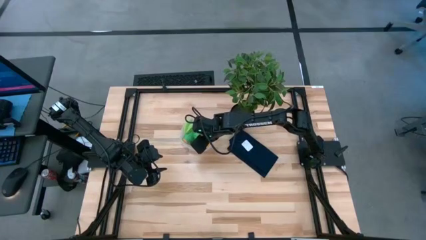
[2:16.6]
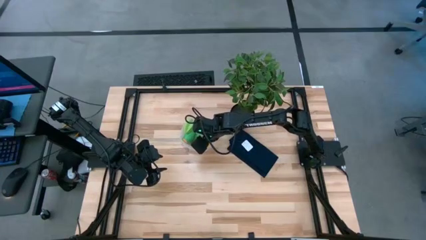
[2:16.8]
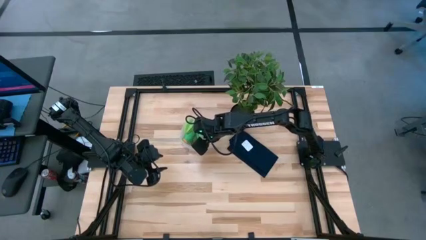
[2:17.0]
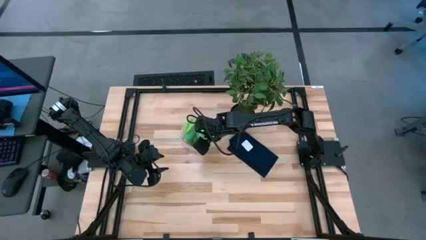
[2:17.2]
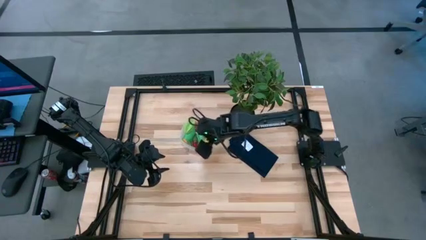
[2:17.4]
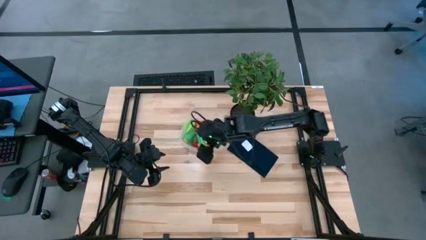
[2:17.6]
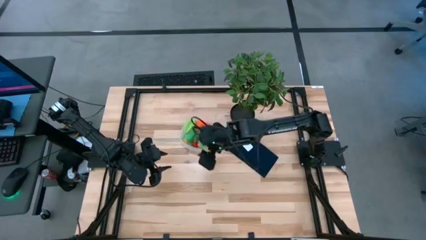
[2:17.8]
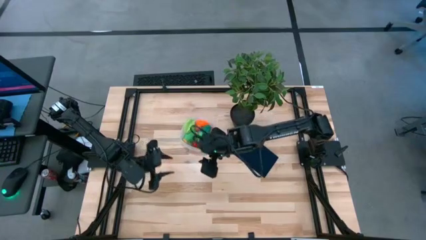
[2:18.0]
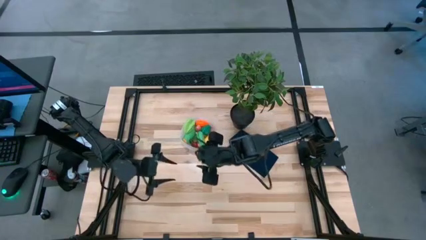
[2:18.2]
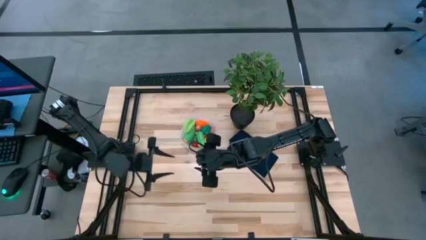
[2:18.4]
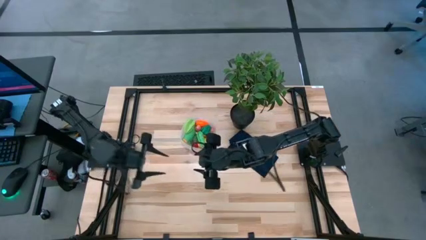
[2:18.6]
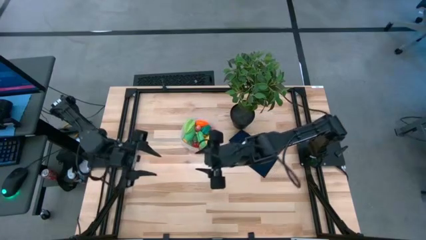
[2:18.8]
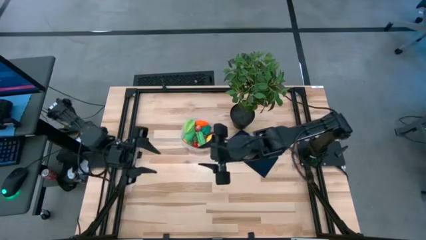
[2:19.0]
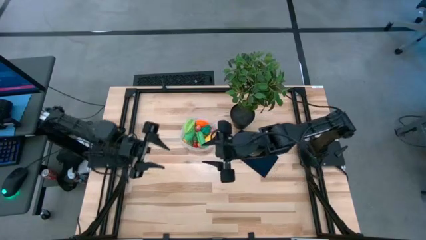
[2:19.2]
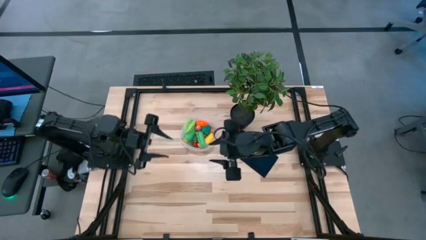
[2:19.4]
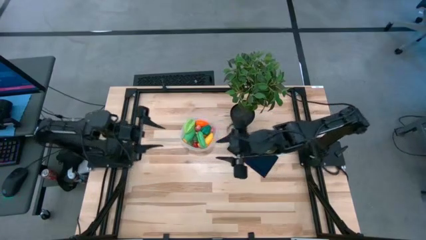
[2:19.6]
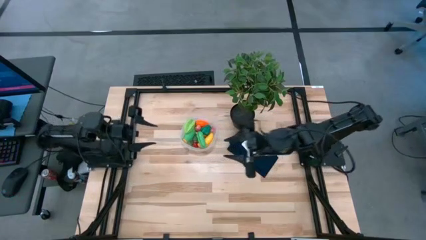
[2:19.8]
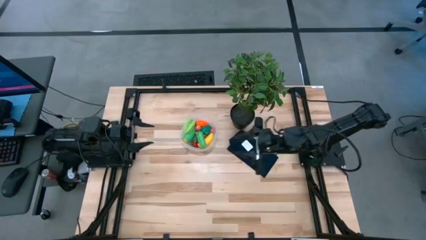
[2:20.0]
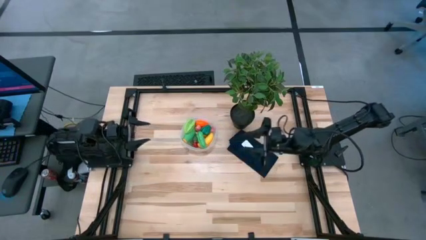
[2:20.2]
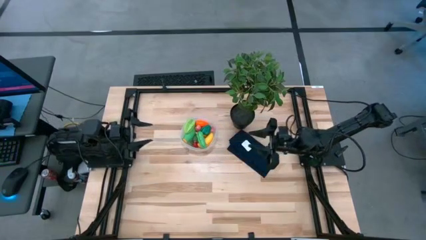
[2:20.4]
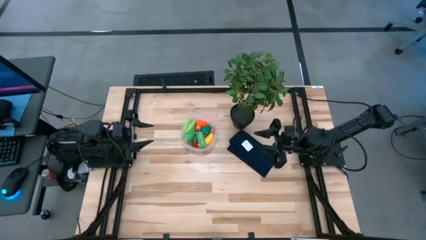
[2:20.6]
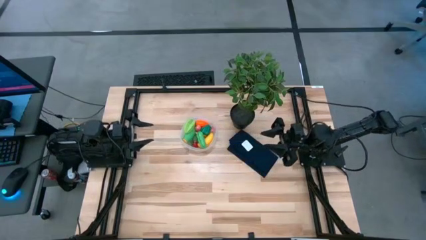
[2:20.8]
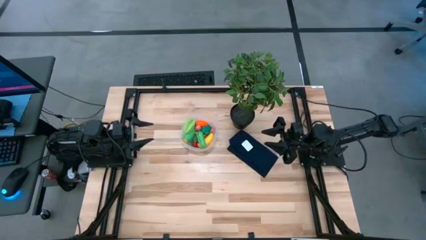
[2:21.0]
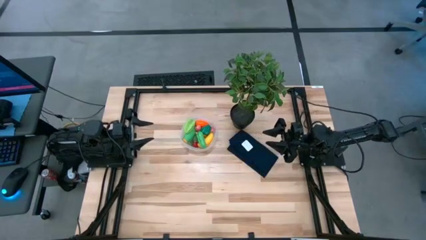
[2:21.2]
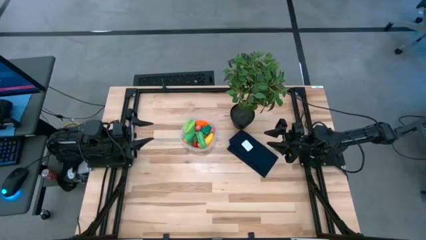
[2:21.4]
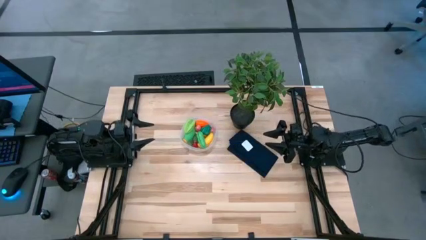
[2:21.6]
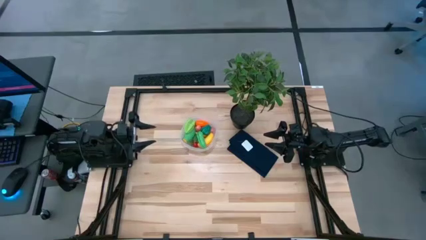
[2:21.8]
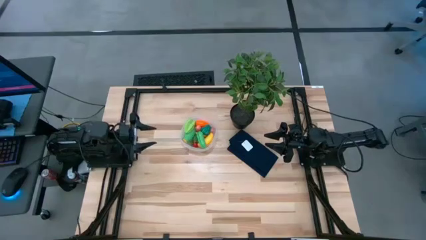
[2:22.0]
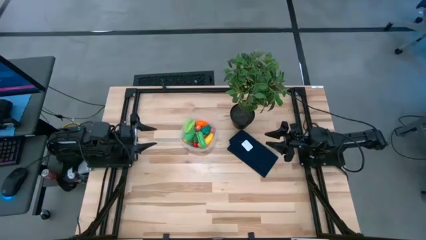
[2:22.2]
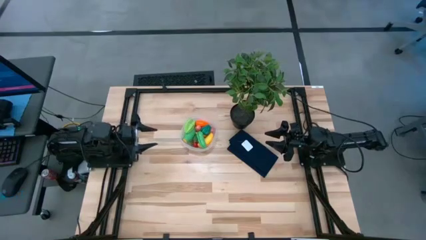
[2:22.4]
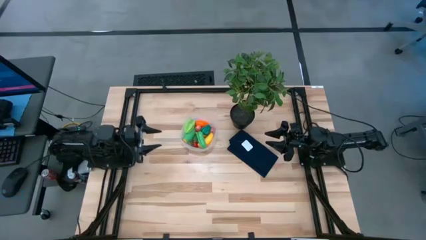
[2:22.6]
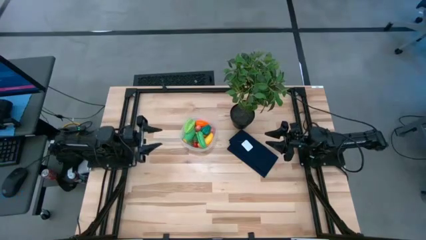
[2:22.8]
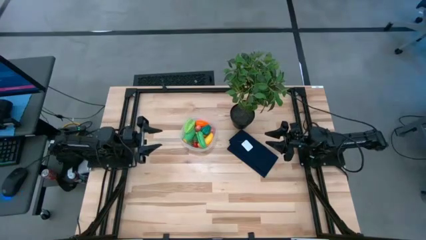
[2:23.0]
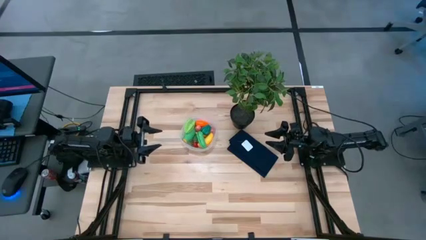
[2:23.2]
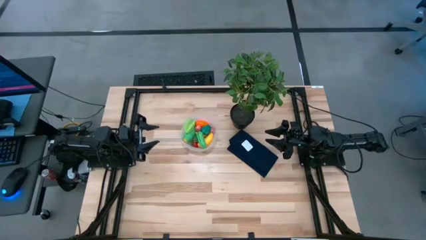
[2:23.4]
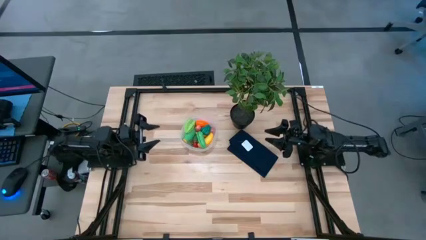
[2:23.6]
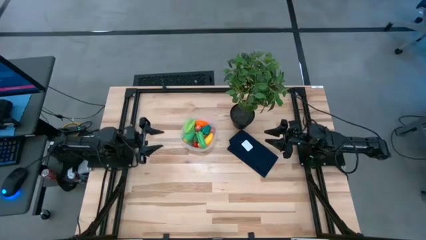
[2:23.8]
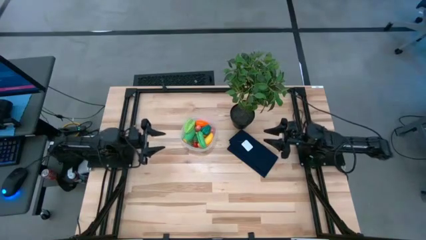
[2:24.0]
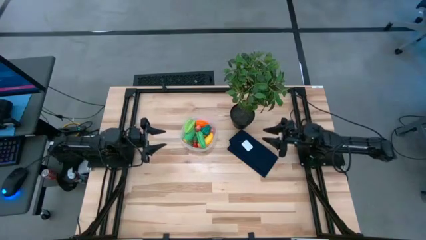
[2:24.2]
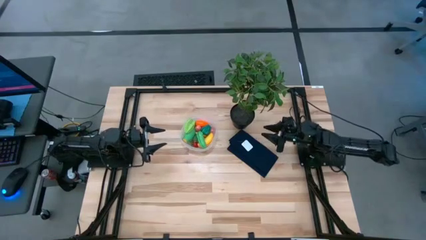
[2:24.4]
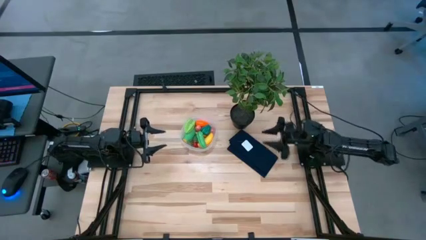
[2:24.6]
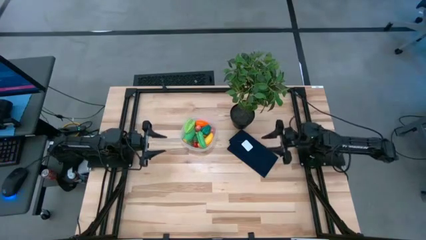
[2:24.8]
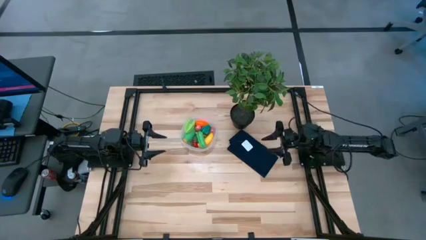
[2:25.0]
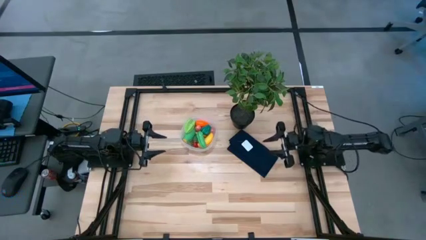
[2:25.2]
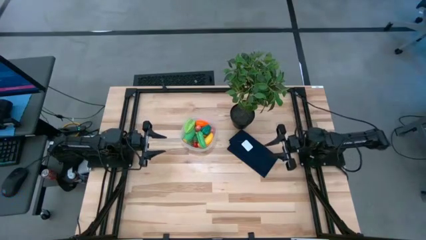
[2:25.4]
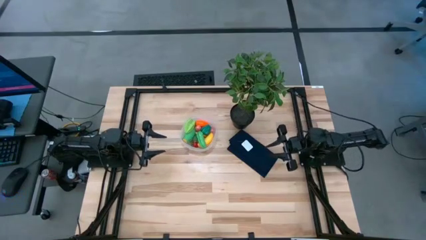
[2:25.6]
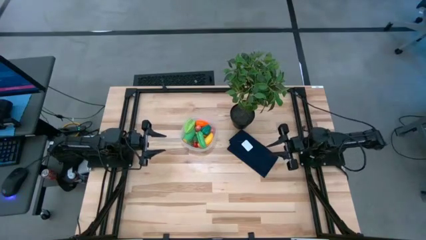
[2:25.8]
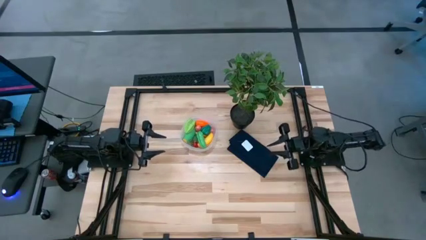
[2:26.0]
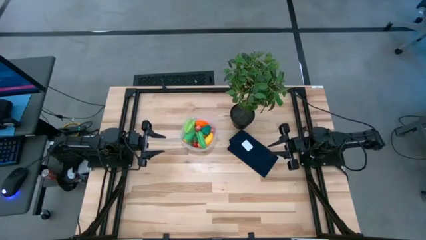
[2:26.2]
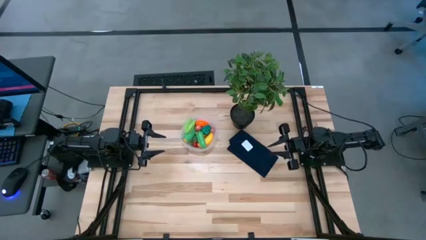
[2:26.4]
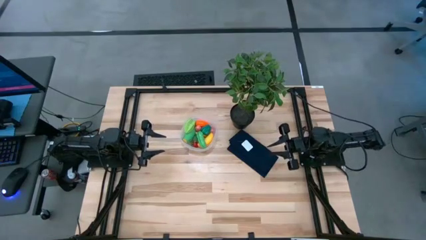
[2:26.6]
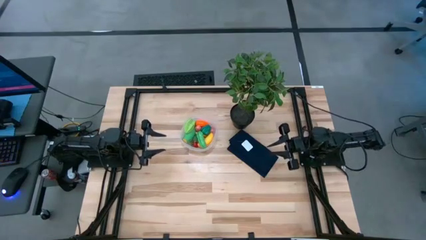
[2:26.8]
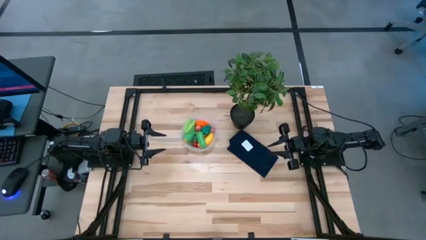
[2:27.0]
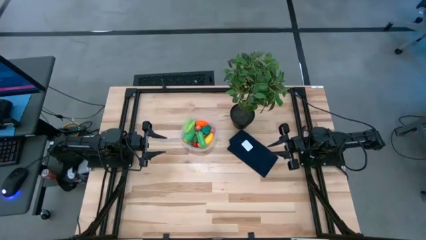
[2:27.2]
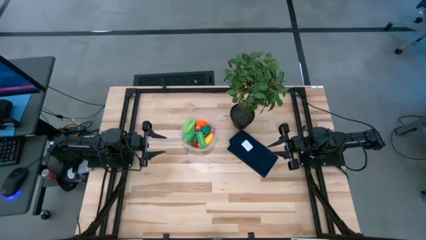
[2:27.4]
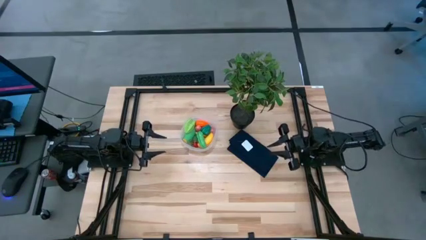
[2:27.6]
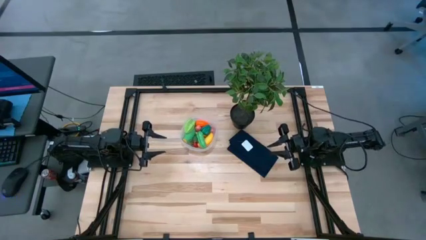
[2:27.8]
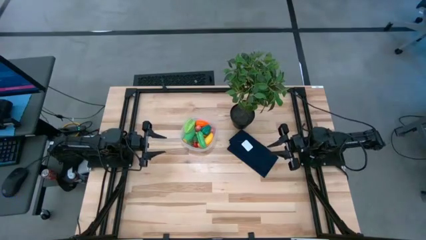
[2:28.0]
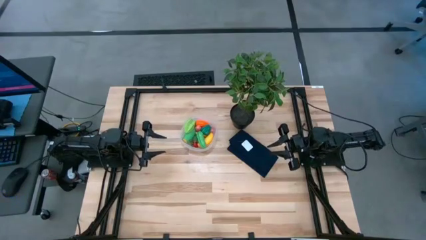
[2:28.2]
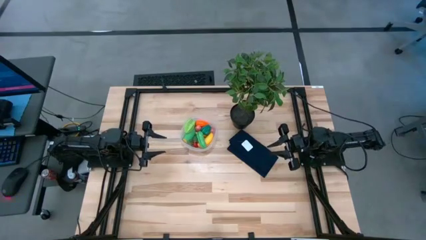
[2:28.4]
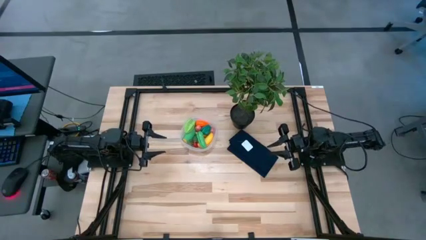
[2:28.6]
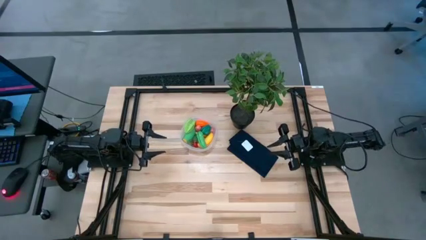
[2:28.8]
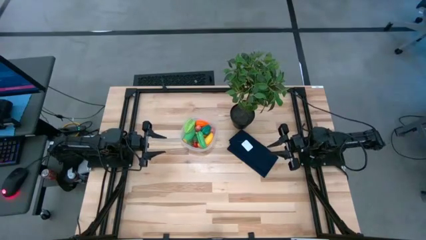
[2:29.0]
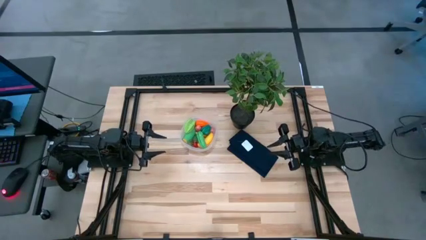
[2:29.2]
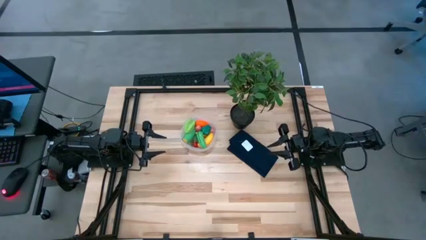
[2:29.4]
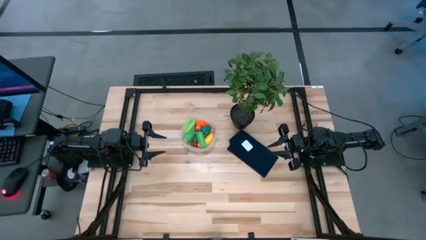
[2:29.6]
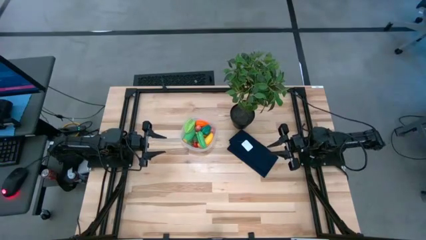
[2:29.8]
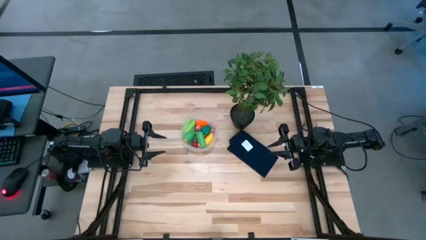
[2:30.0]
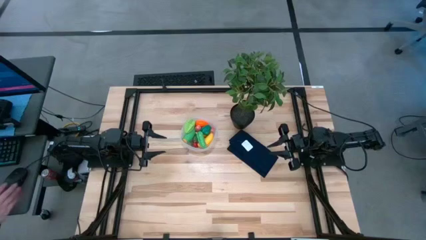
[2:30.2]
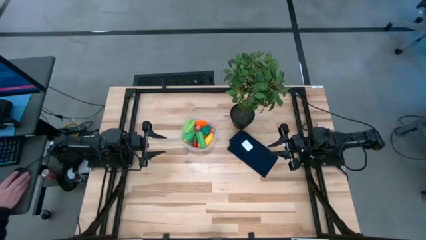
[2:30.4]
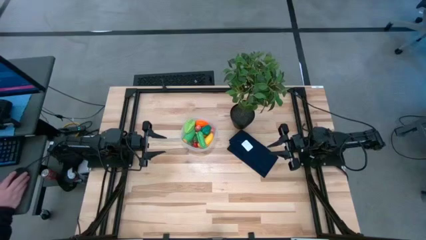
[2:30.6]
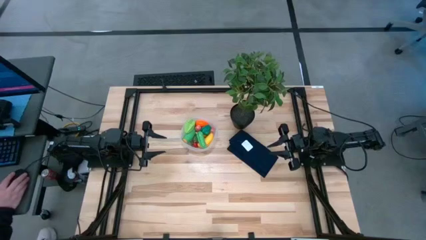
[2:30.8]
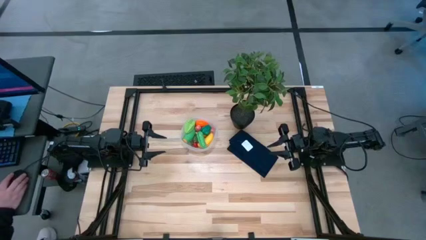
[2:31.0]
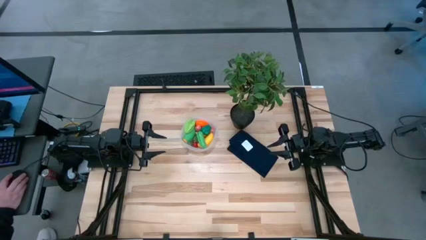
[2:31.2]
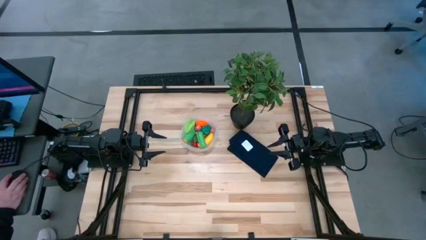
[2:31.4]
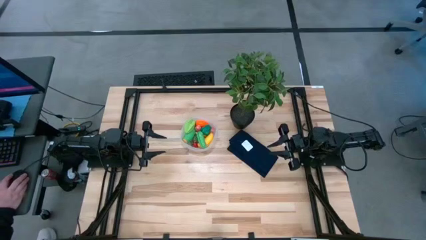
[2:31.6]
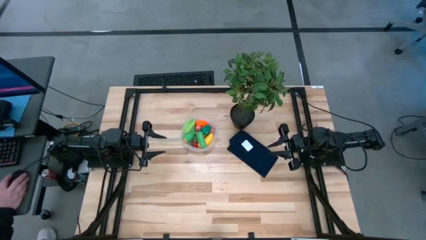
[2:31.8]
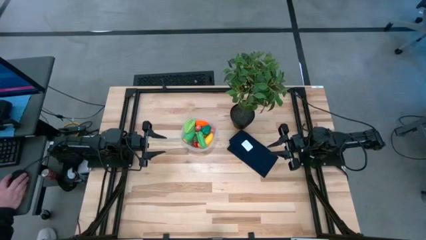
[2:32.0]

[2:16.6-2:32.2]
Task: Pick and placing Produce into tupperware
Return to Home Position

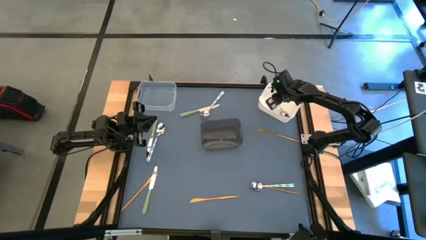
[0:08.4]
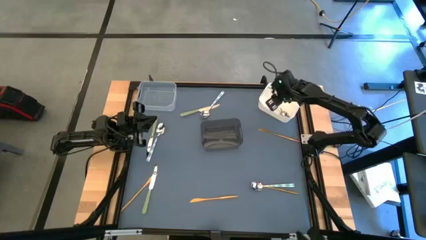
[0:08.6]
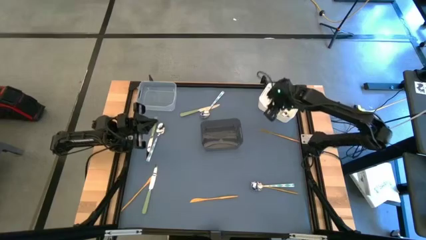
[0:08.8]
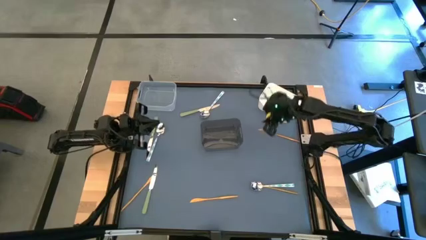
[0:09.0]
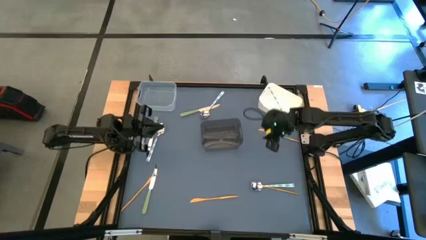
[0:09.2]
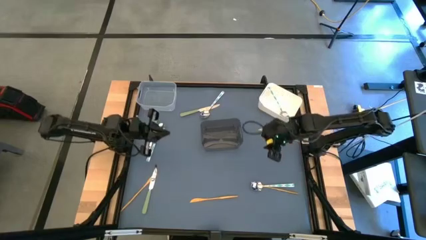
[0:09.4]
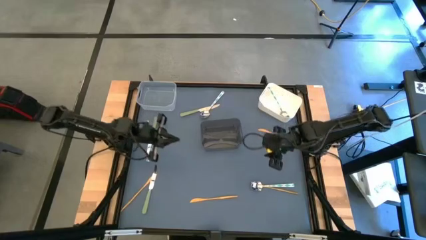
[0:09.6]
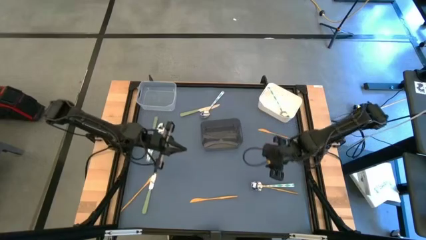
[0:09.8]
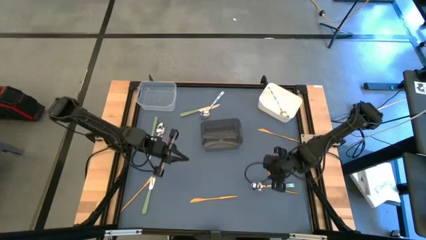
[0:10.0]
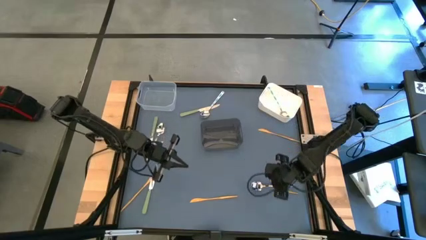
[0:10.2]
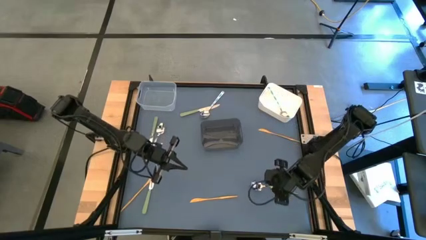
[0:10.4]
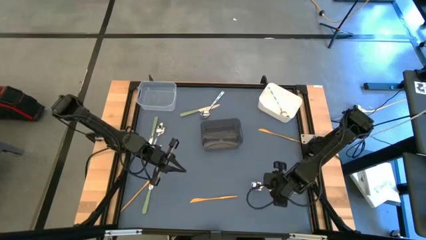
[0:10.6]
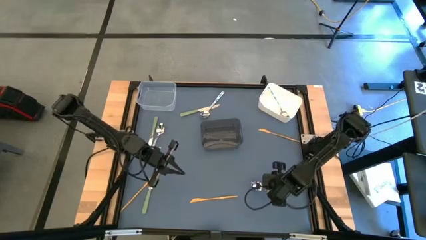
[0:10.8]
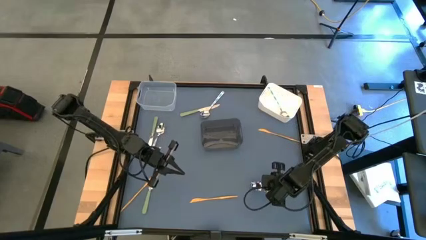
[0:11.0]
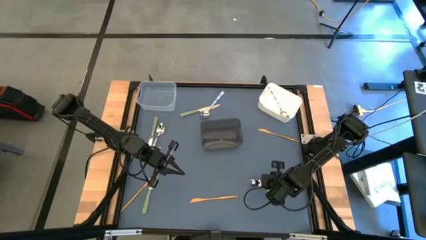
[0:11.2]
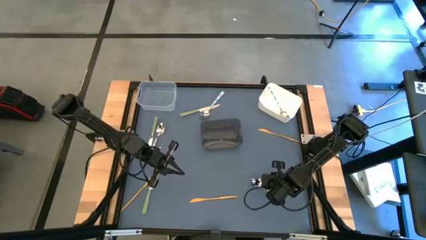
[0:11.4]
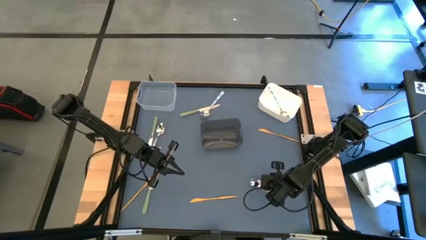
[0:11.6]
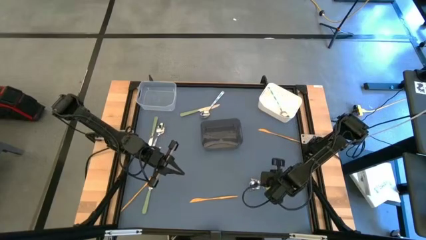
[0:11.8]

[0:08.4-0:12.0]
Task: Sort silverware by color (type)
Put the green spoon into the white bin
